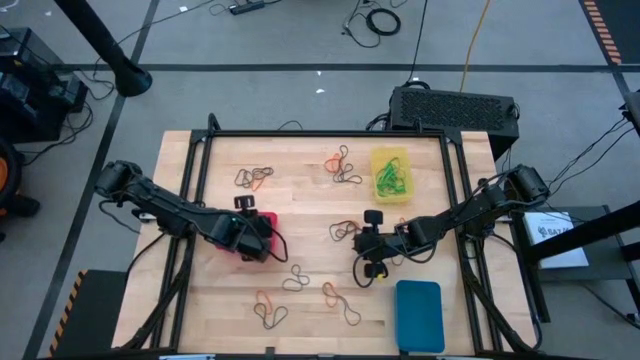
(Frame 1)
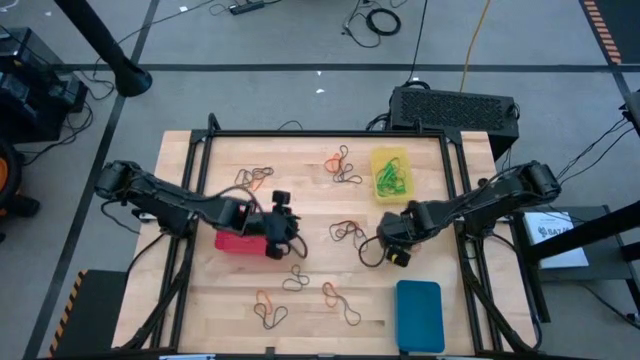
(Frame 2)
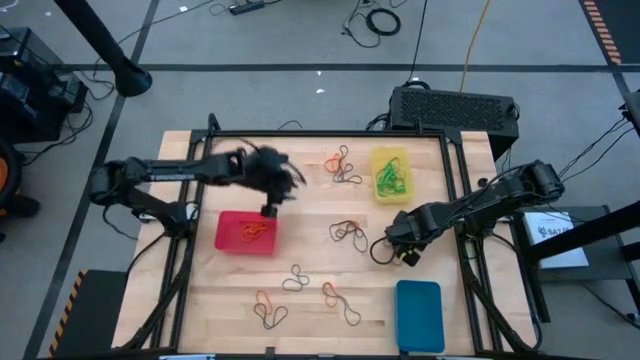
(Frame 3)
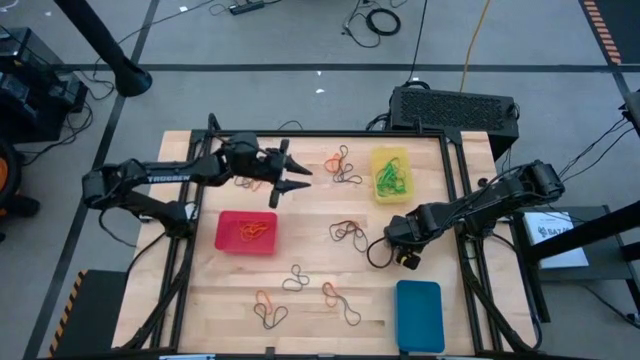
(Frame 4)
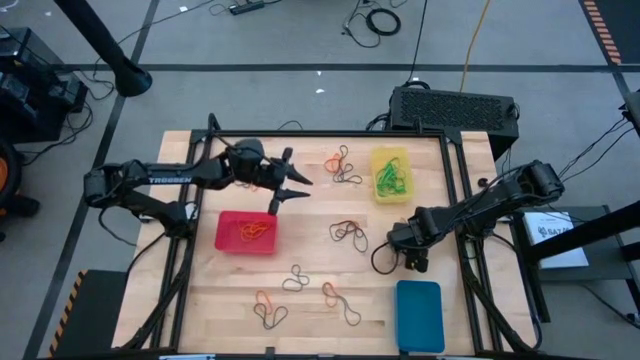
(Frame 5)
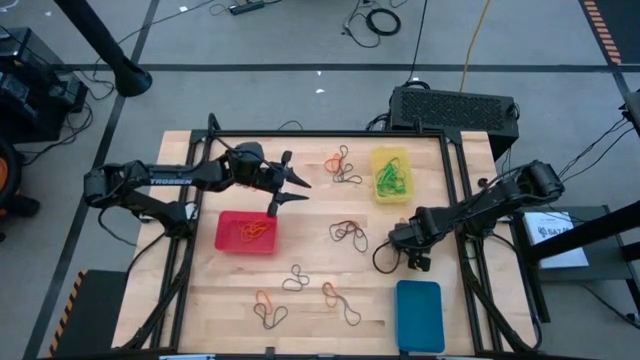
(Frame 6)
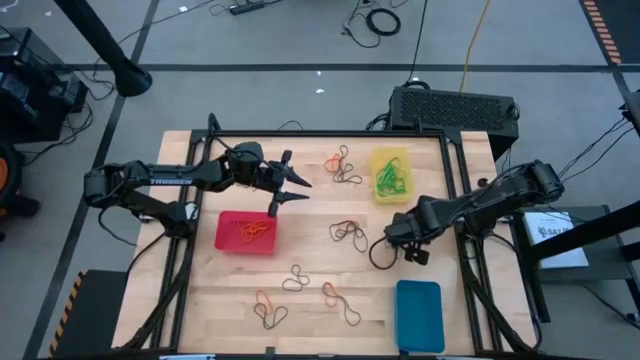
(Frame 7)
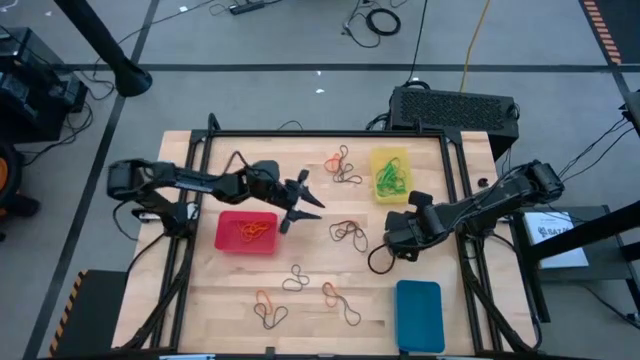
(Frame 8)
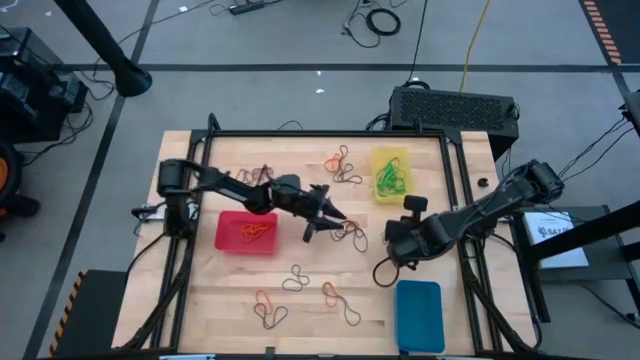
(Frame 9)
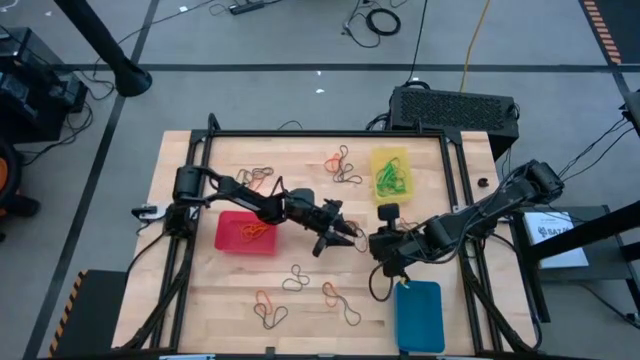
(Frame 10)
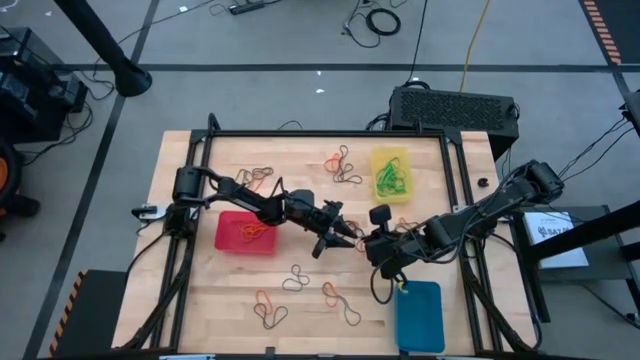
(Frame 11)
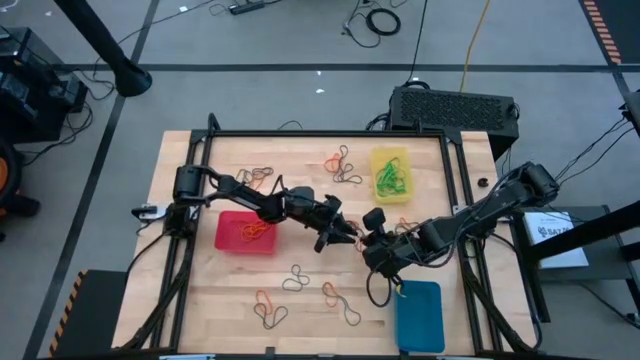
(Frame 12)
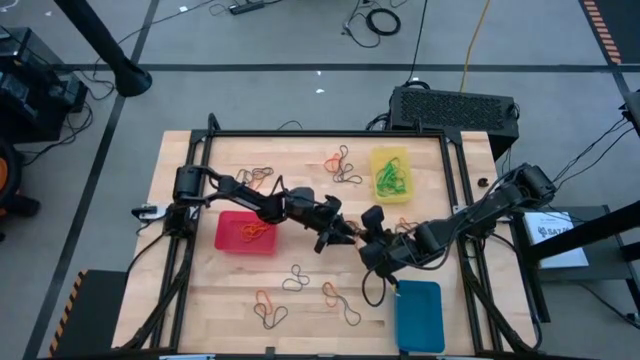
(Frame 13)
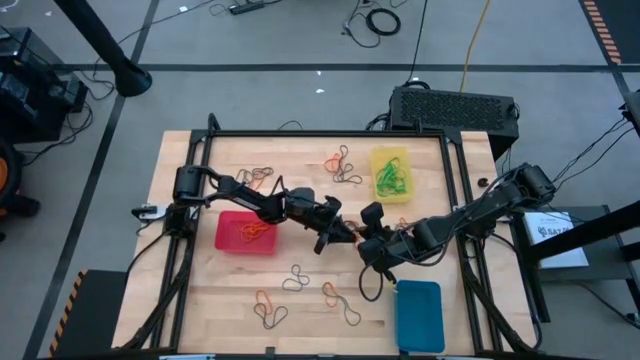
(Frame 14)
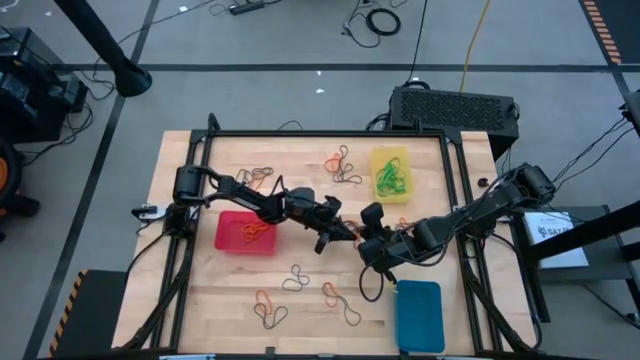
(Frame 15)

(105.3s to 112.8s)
Task: Sort rubber bands into baskets
Put the orange rubber band into the pink bin

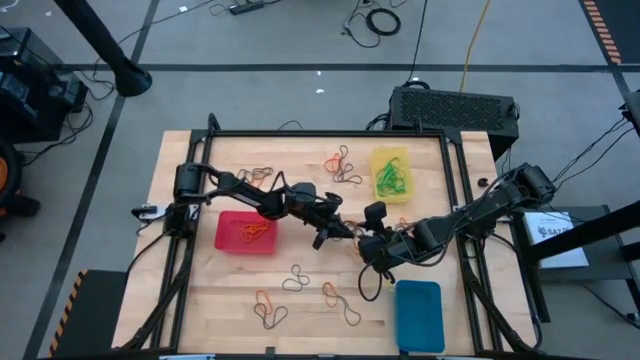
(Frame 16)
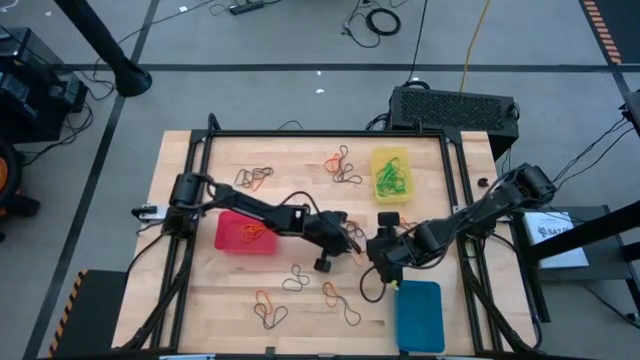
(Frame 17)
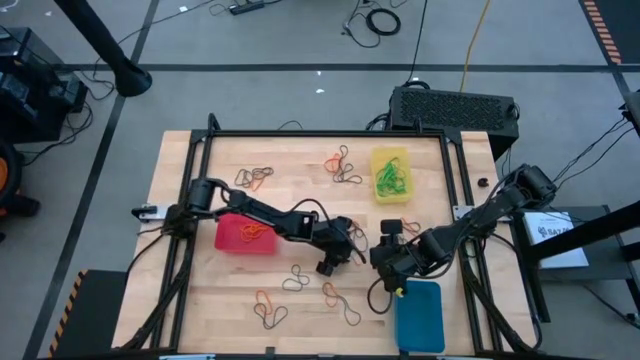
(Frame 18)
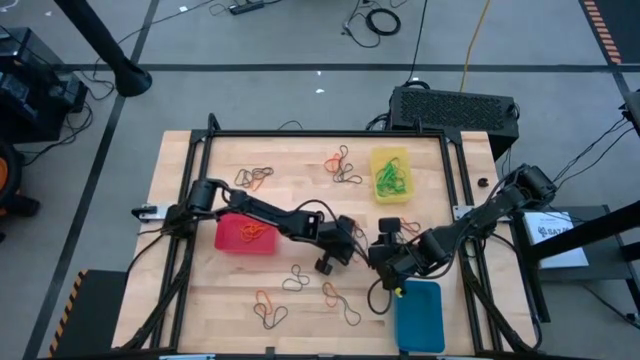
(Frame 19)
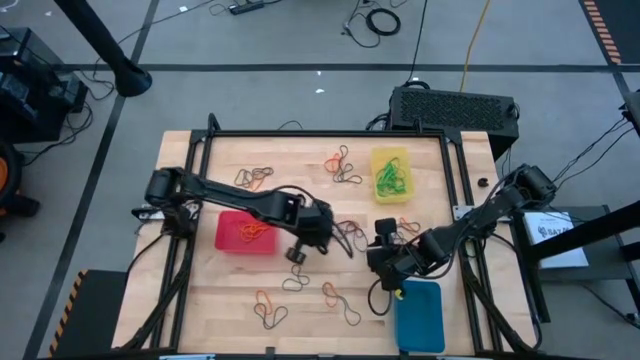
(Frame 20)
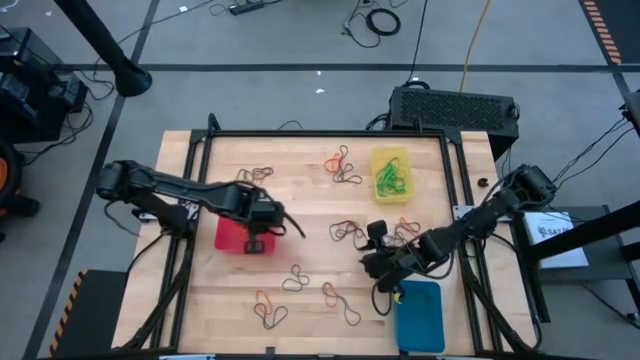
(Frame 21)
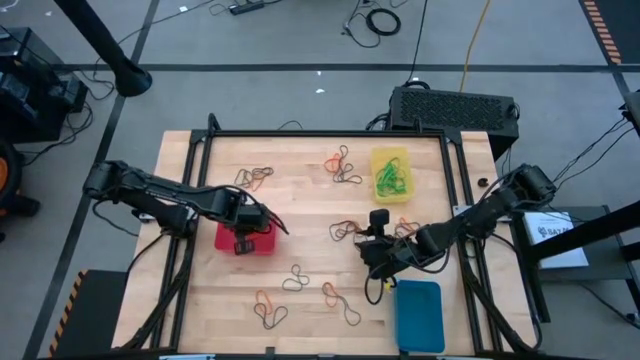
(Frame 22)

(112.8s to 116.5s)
Put the orange rubber band into the pink bin

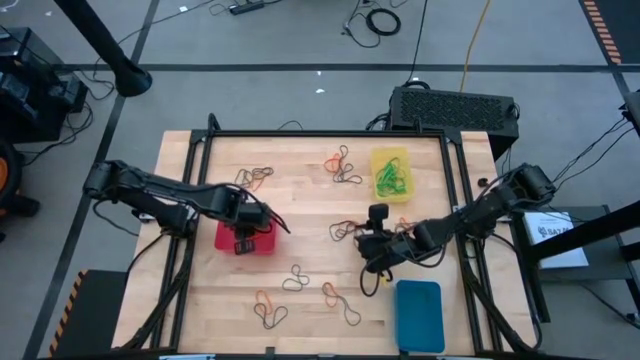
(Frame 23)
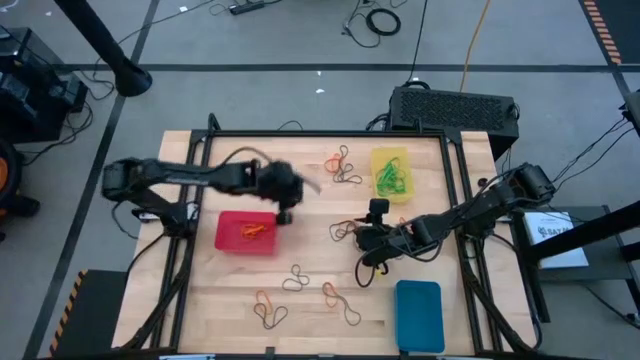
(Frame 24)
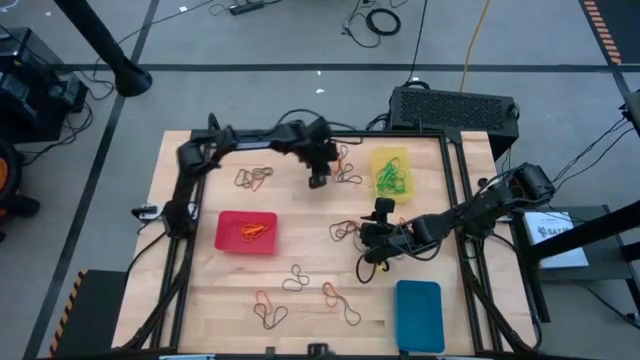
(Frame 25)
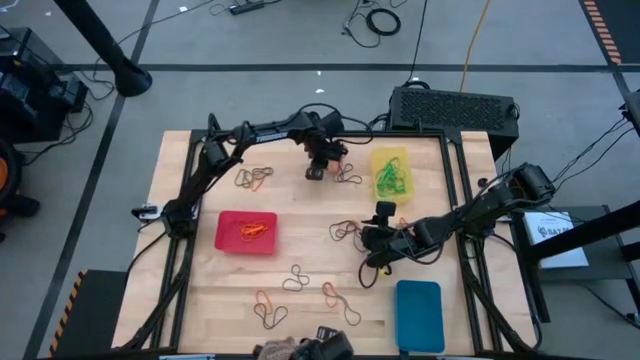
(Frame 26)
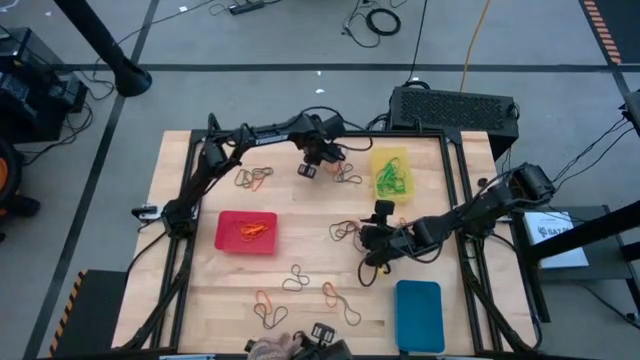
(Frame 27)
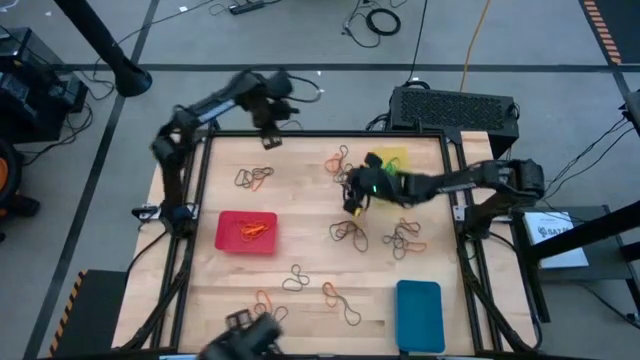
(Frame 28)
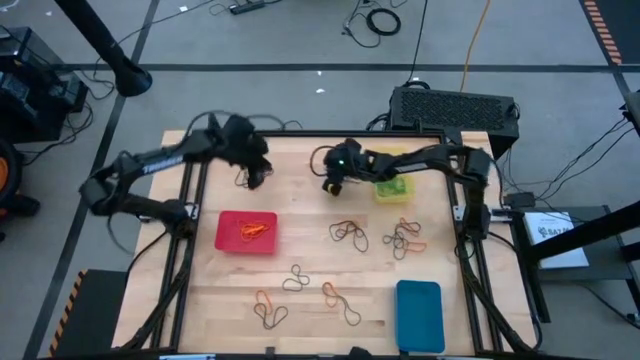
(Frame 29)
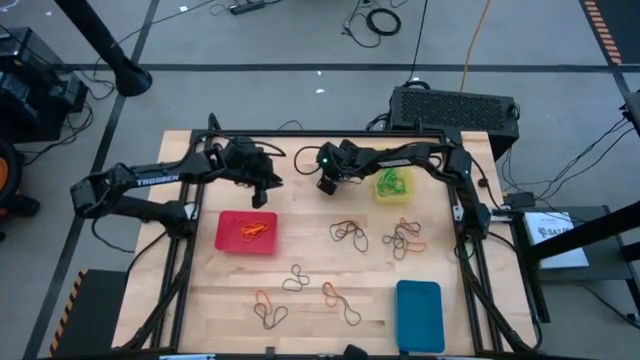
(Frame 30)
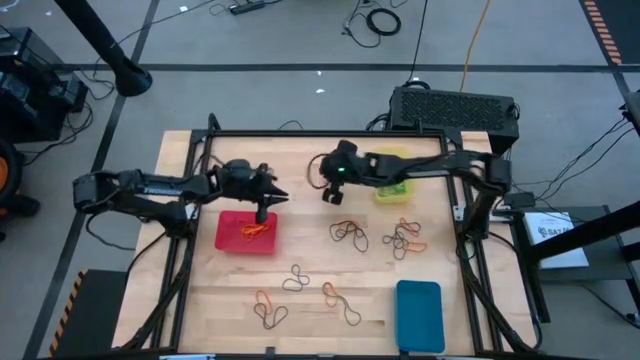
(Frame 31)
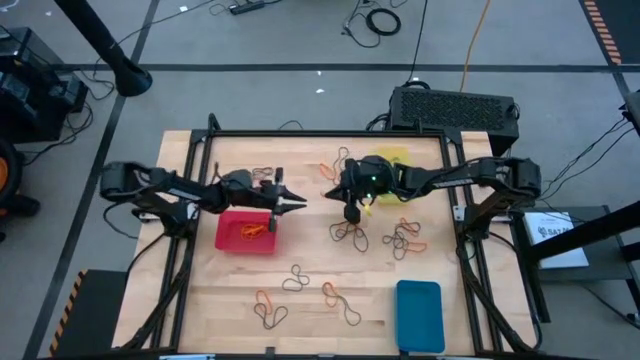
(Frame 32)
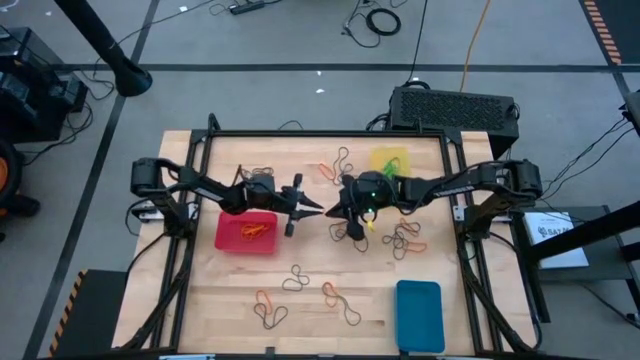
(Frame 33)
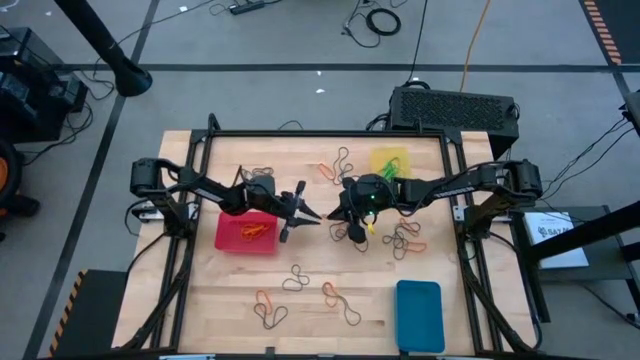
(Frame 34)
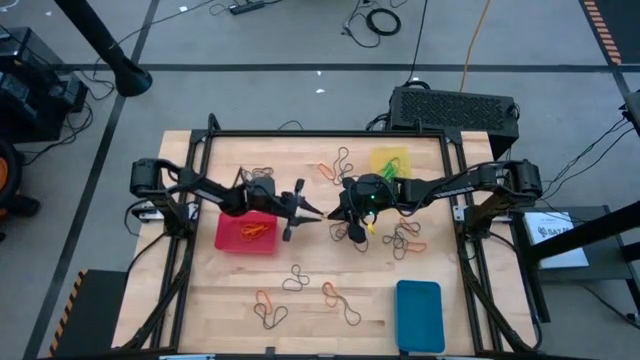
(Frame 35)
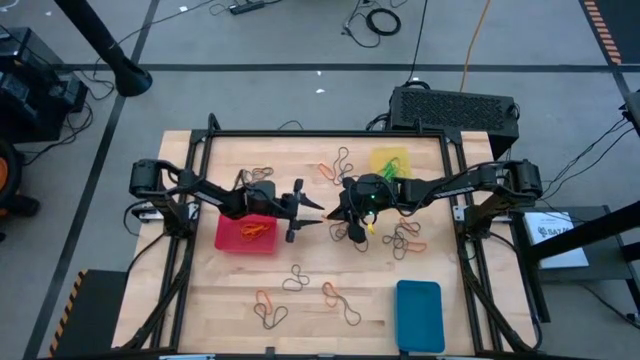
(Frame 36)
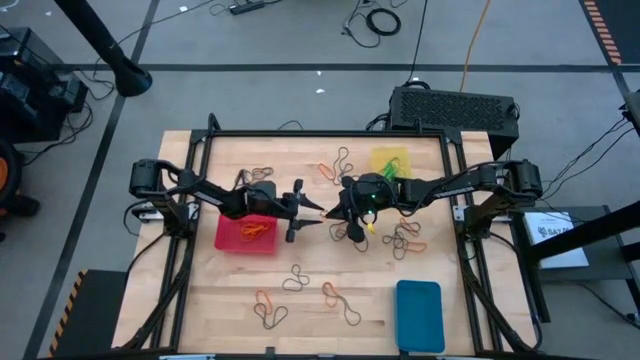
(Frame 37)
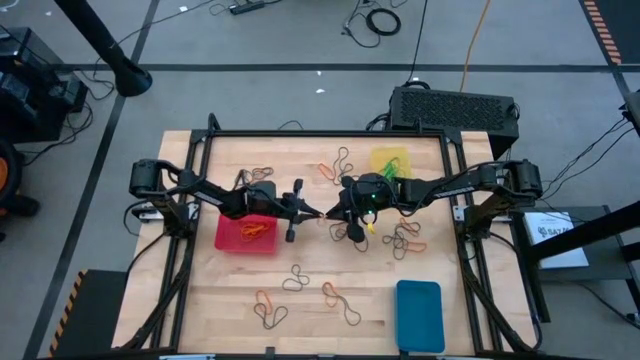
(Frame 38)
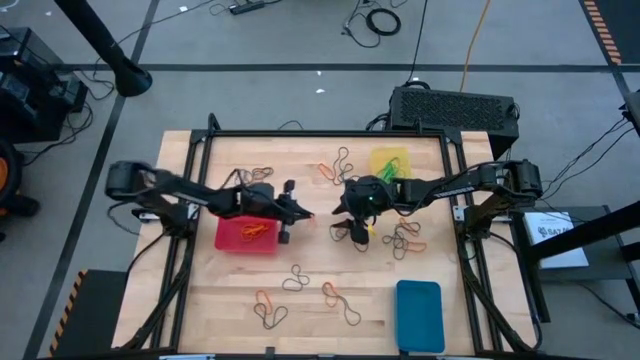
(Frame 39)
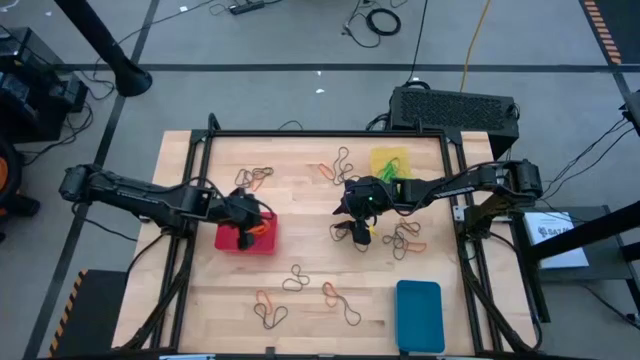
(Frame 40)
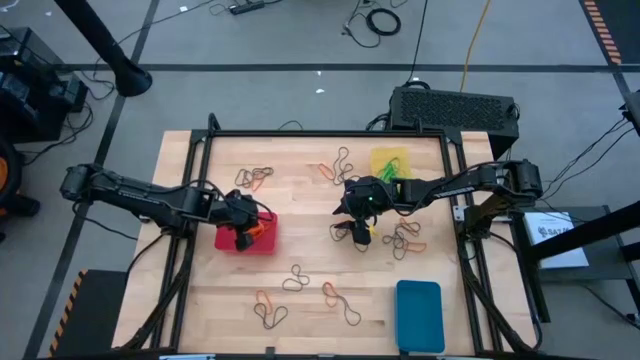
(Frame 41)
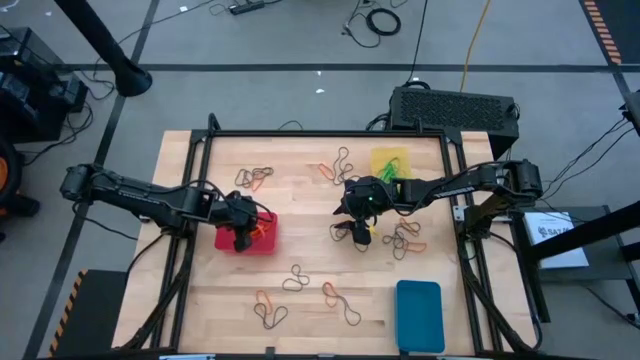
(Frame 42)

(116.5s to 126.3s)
Put the orange rubber band into the pink bin
